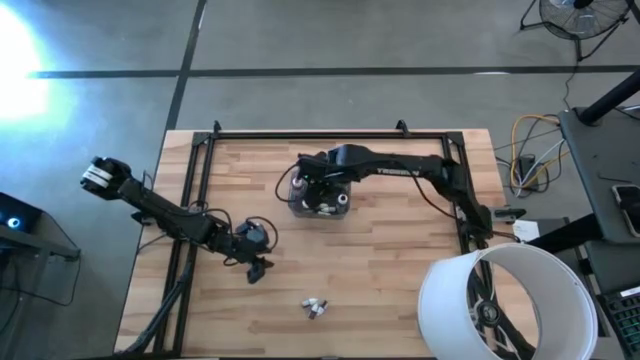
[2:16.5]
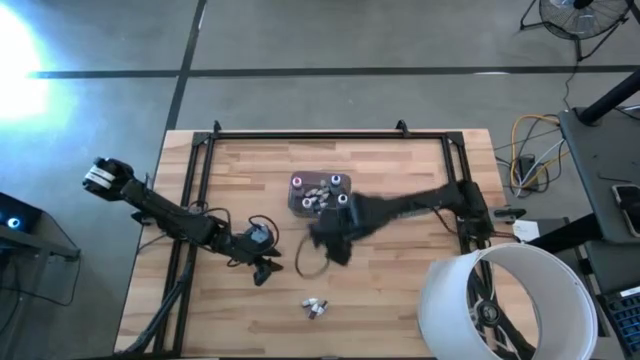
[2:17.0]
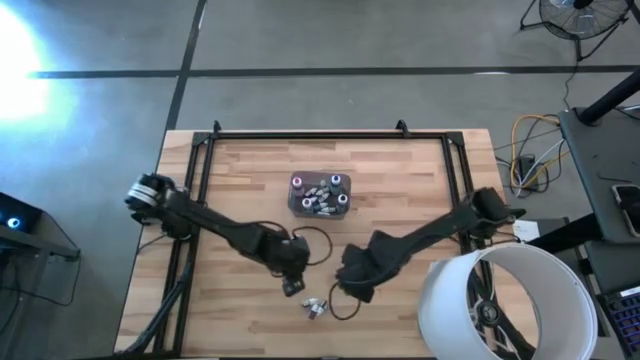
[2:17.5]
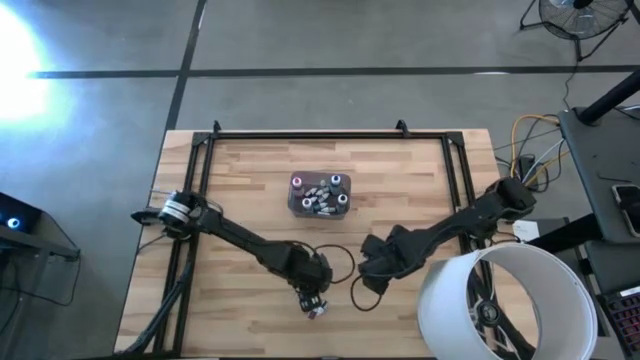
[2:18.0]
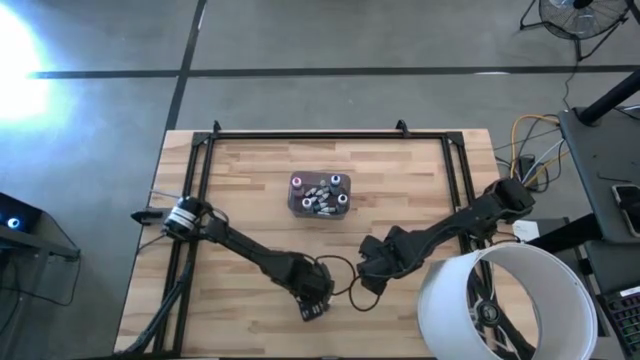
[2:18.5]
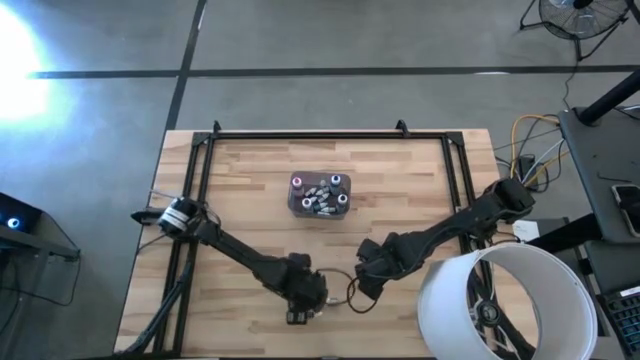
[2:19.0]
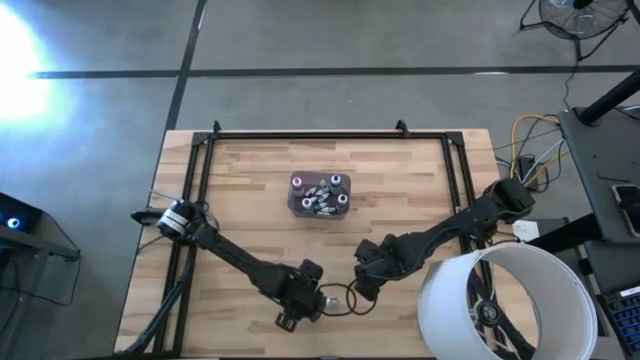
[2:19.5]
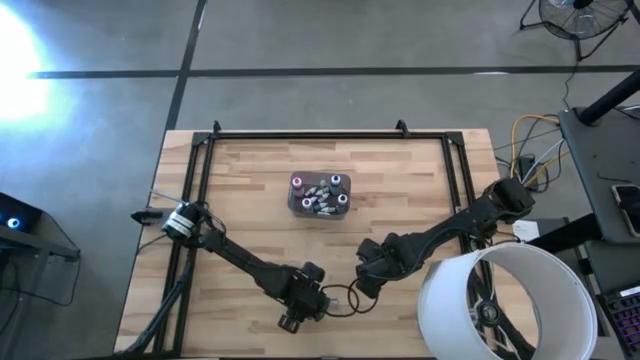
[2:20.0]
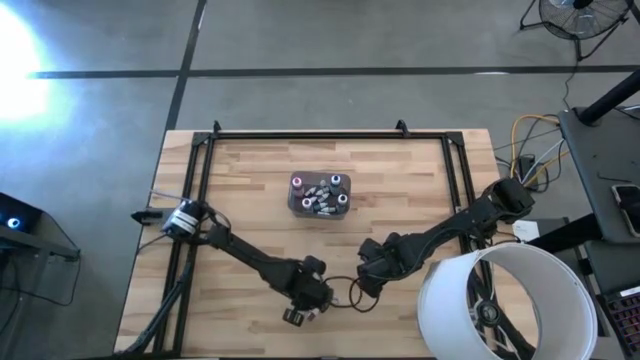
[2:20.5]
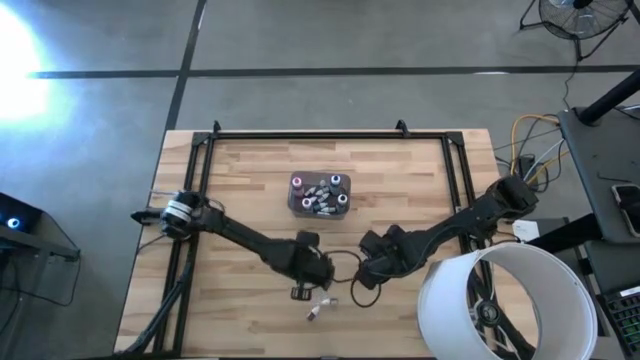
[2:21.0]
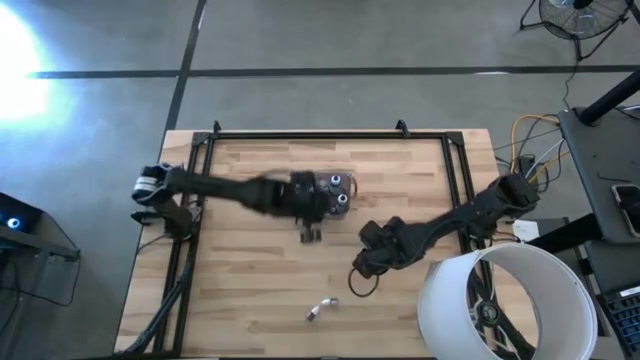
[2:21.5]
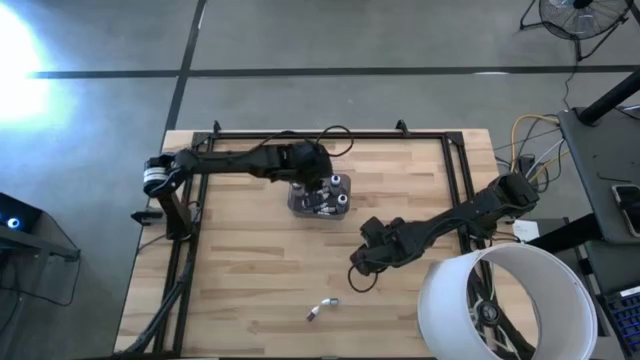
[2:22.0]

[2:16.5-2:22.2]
Task: Pick & Place food coloring
Put the small purple food coloring bottle into the black bin

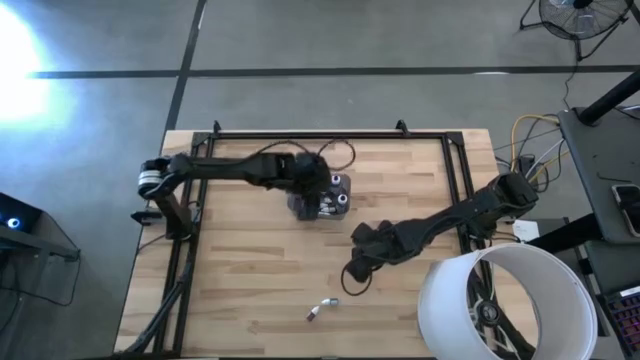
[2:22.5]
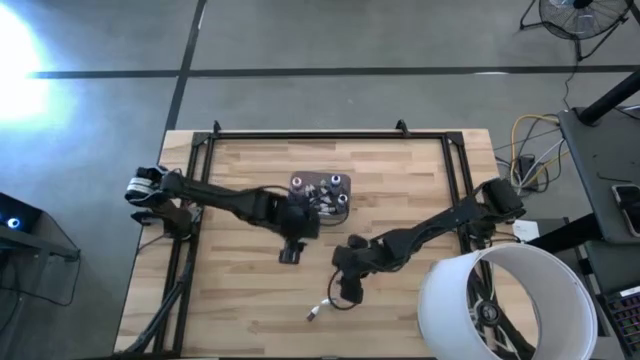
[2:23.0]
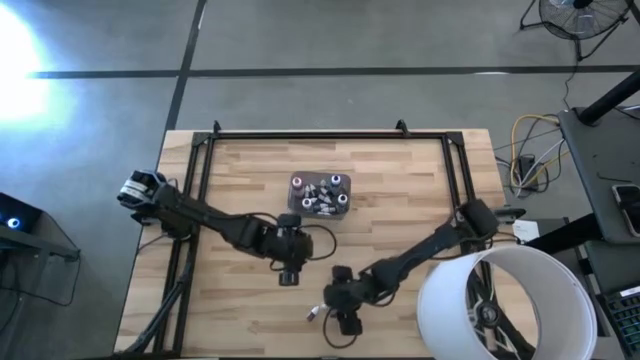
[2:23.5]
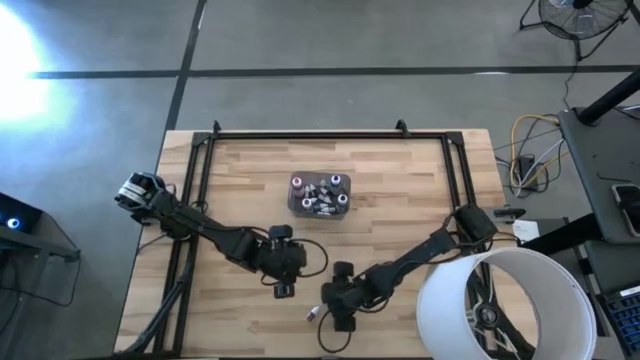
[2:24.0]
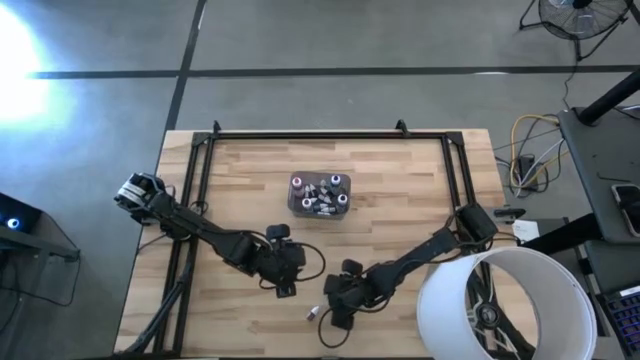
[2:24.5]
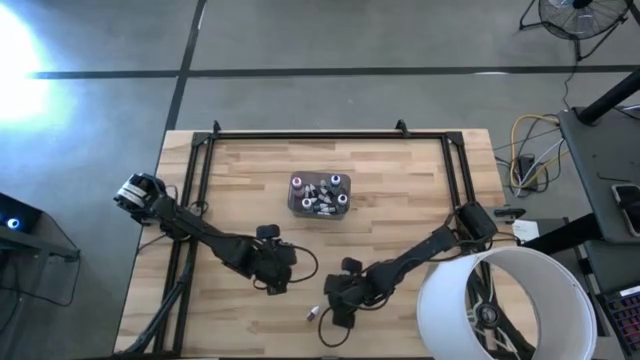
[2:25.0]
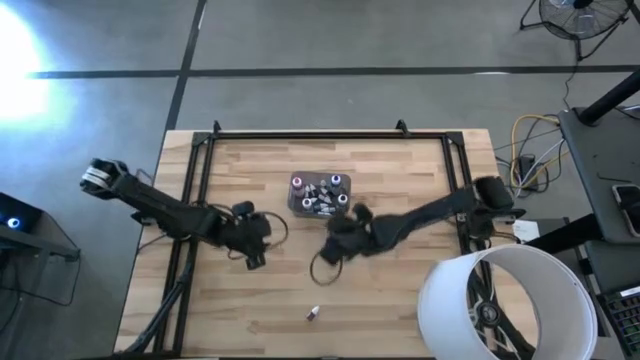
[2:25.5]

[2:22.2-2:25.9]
Put the small red food coloring bottle into the black bin

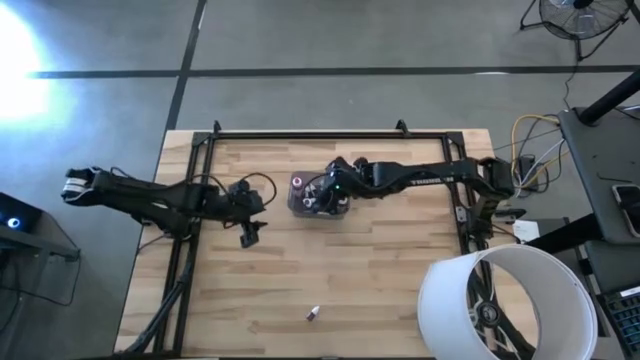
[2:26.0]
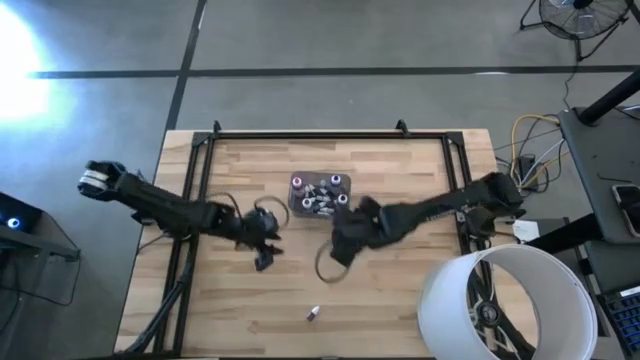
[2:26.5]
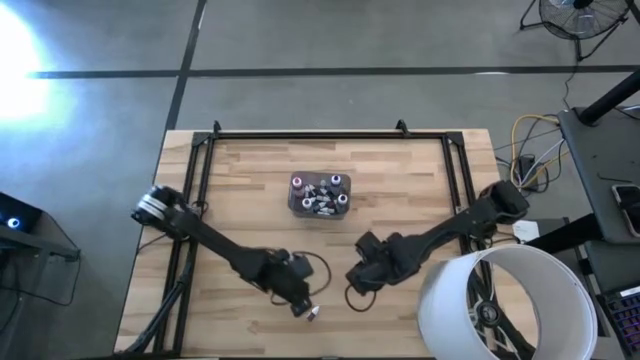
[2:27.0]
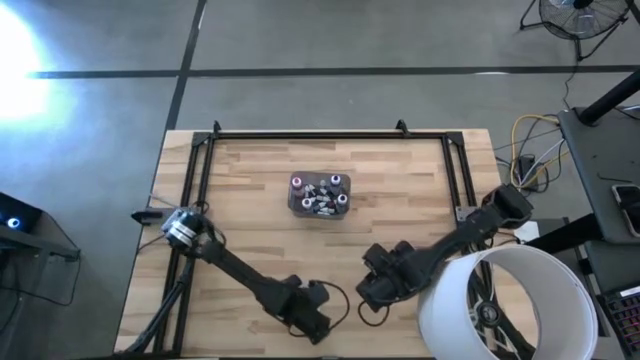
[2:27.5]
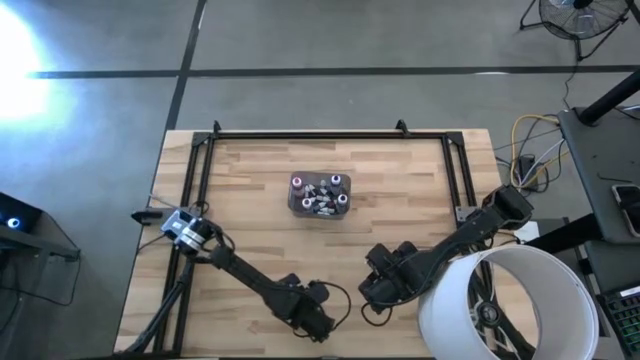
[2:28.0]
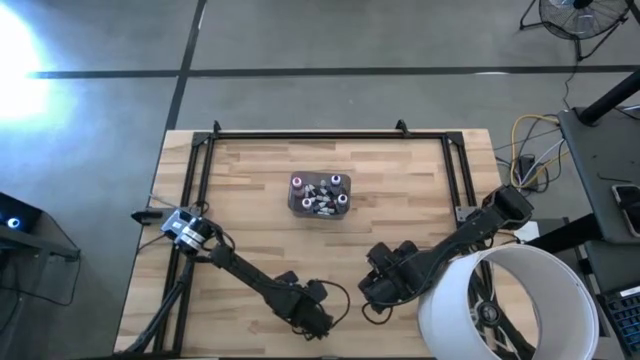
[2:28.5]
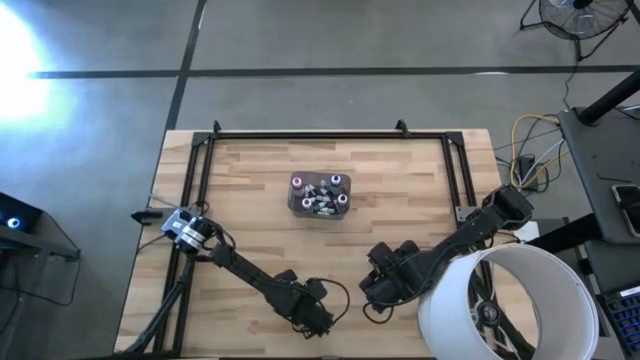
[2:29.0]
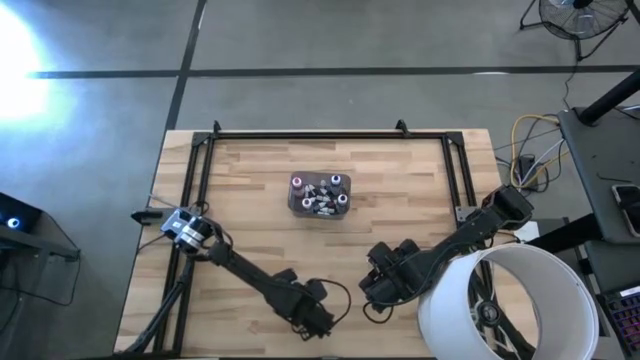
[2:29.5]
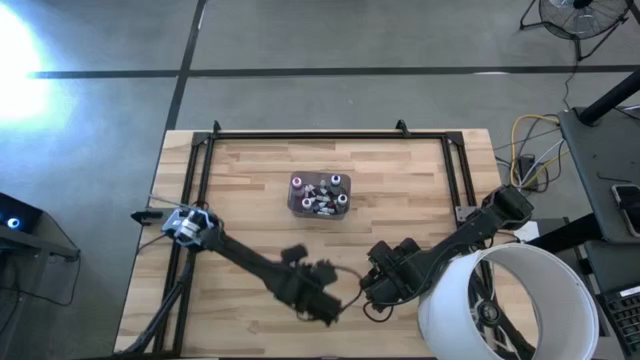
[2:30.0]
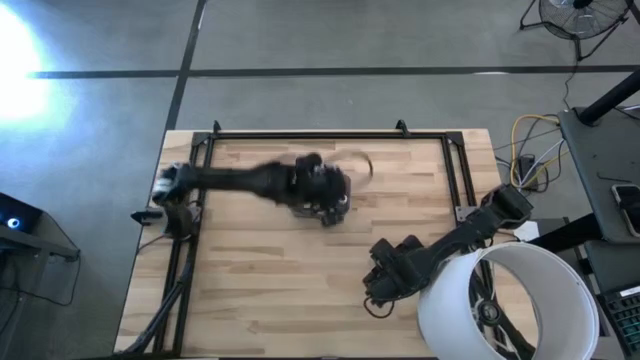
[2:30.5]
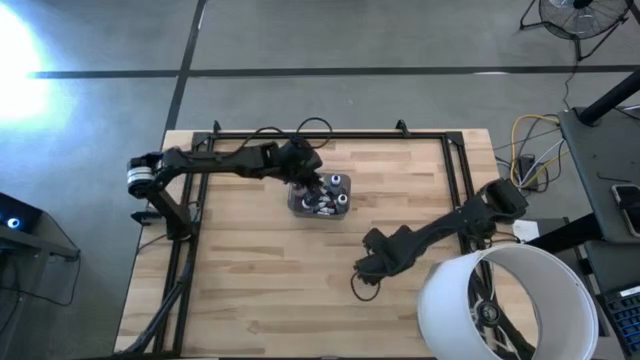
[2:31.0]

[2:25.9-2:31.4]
Put the small yellow food coloring bottle into the black bin

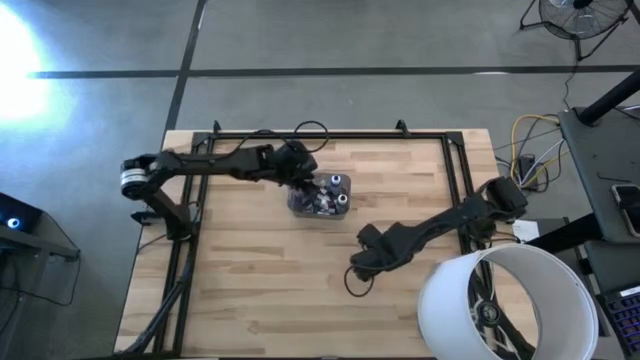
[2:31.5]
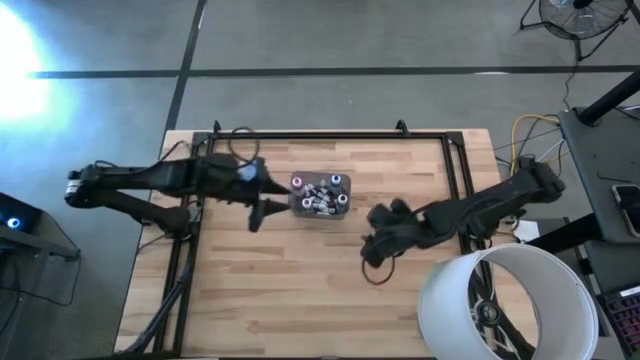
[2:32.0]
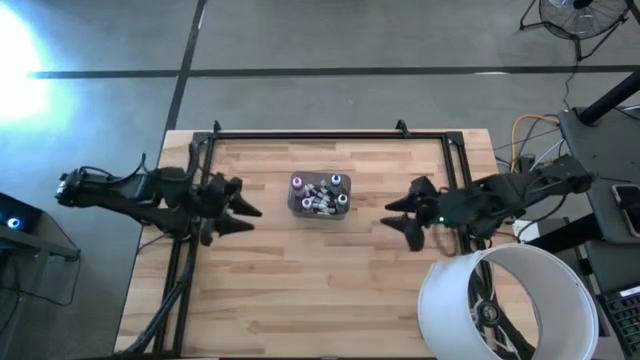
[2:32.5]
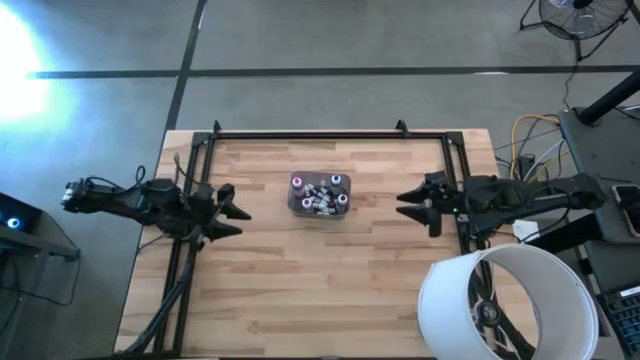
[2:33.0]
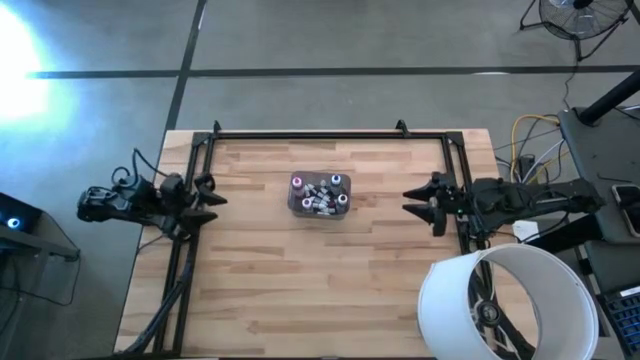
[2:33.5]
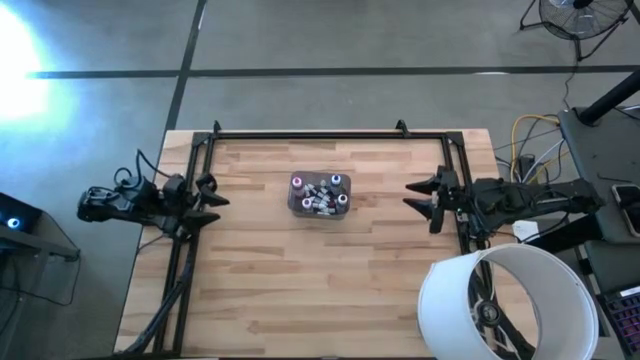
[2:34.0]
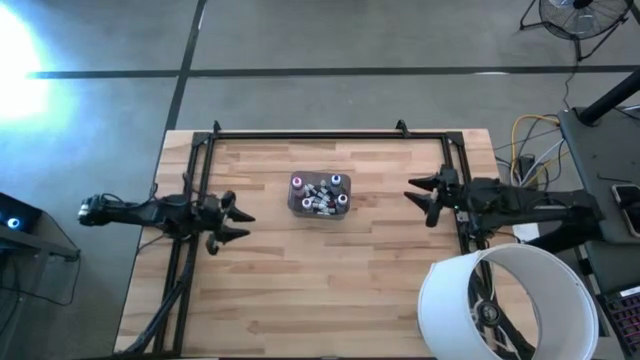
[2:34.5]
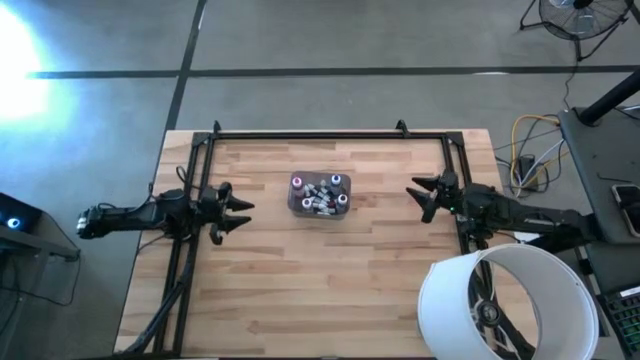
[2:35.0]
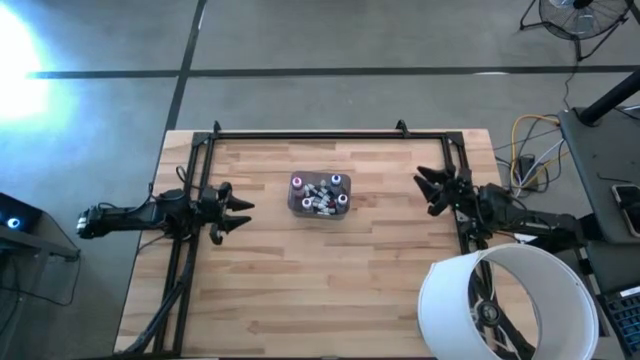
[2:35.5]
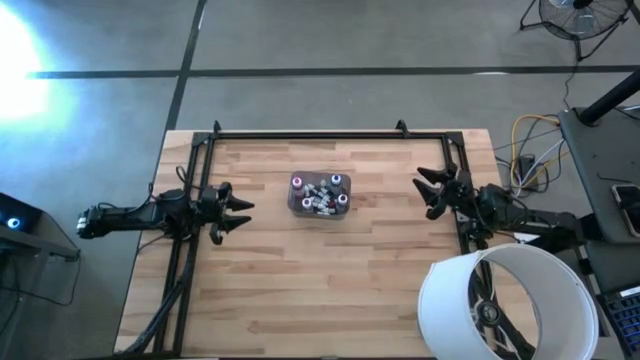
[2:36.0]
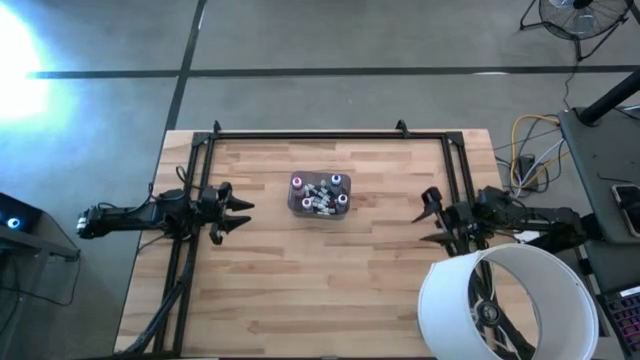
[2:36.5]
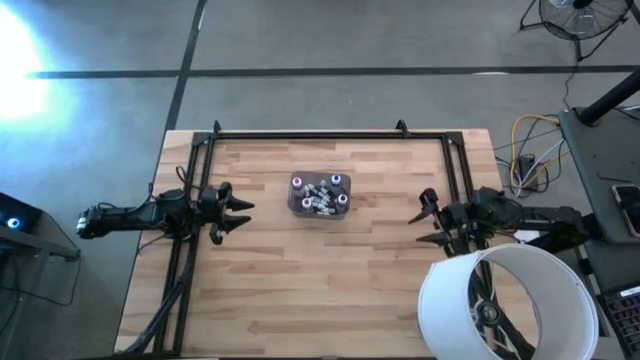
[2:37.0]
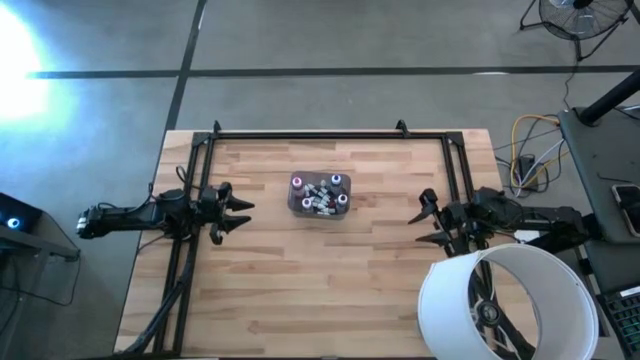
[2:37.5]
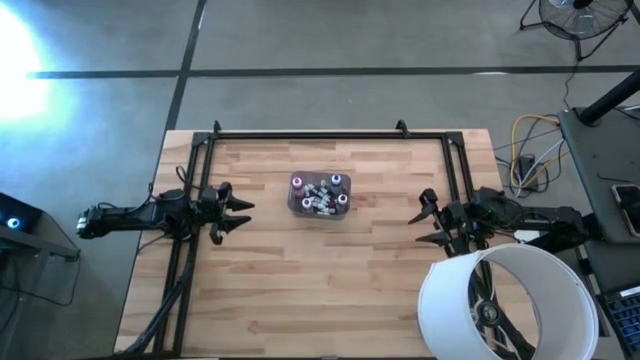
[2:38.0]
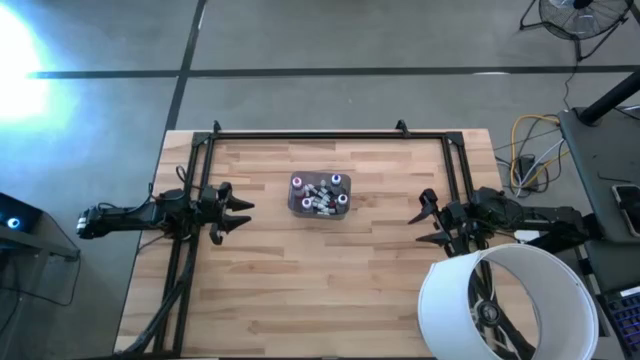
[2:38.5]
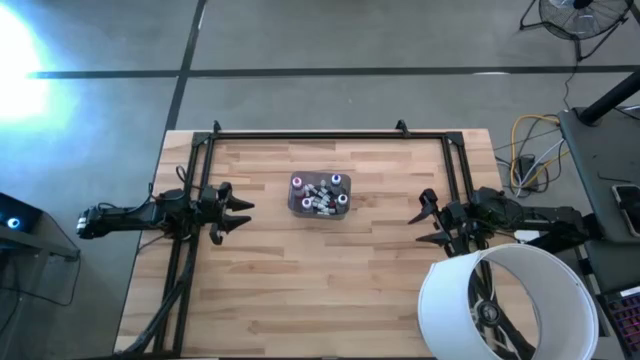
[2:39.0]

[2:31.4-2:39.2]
Return to Home Position
